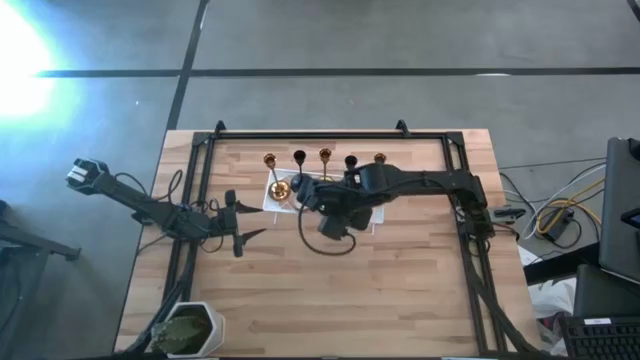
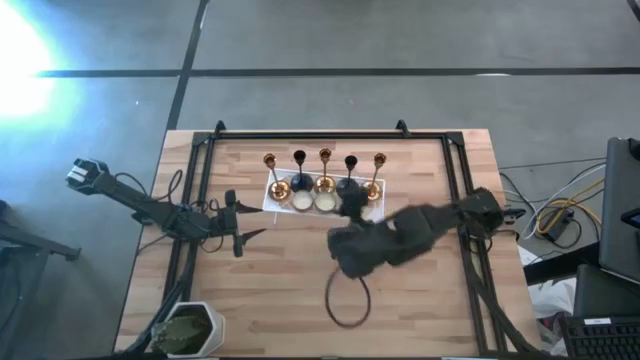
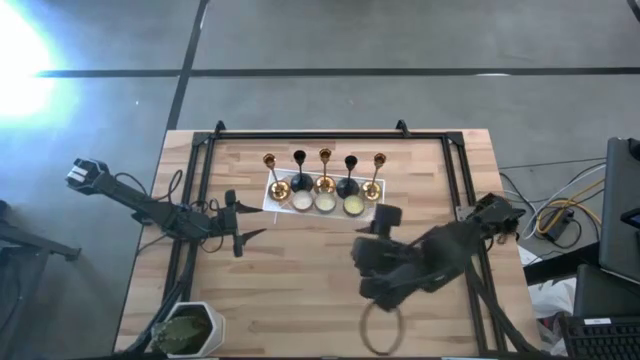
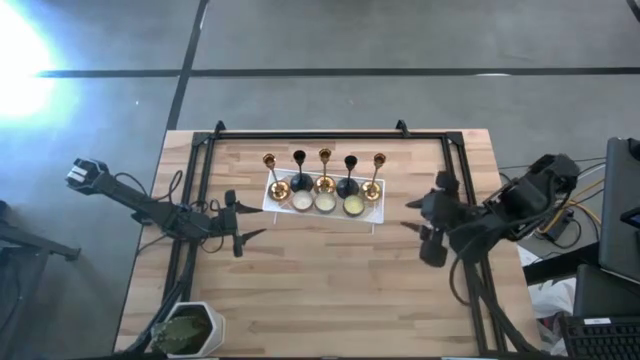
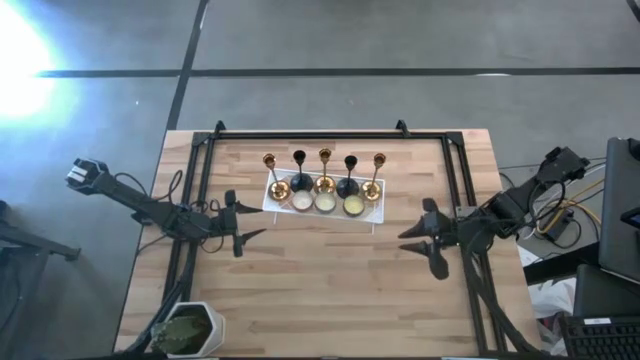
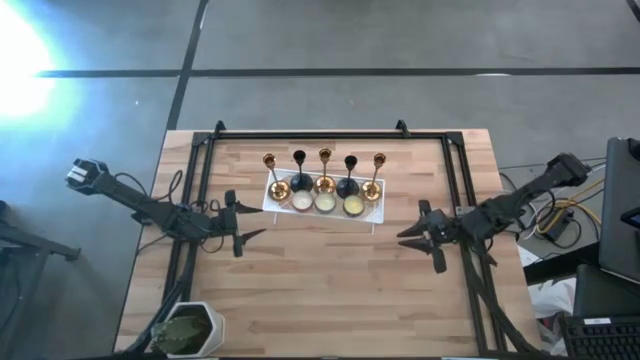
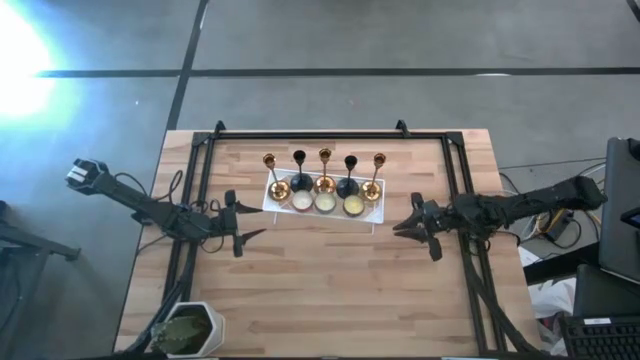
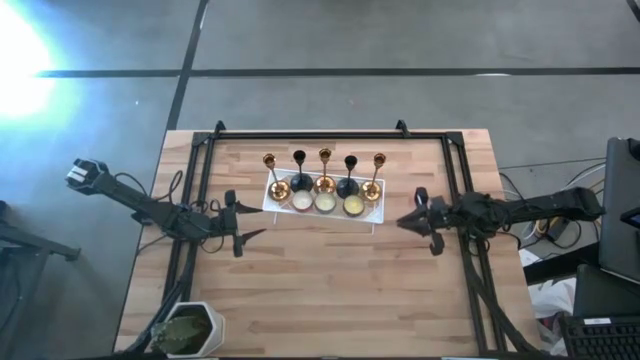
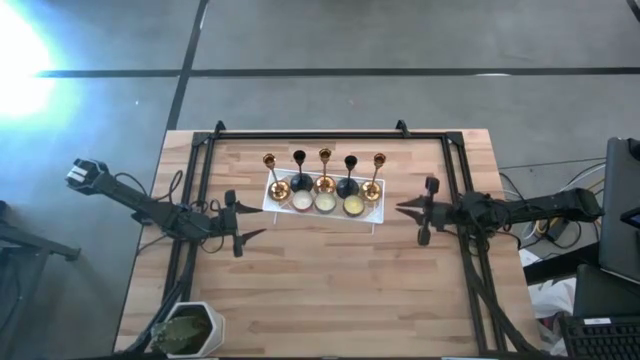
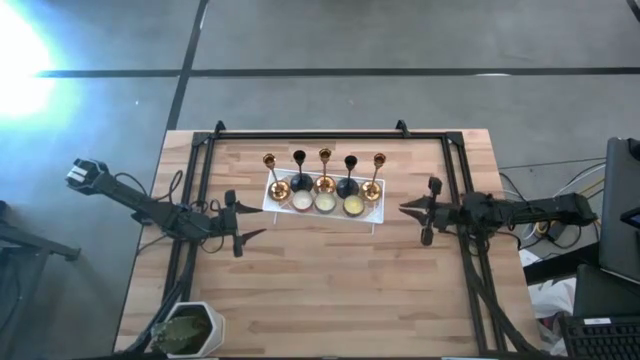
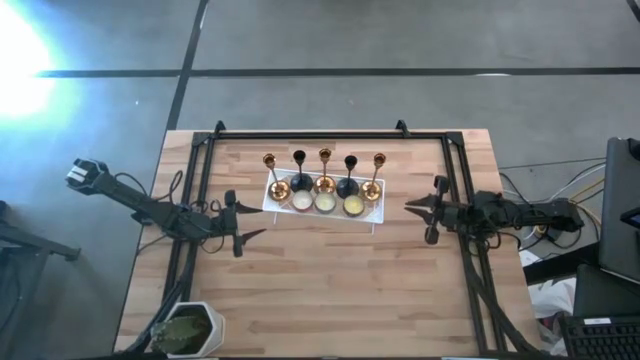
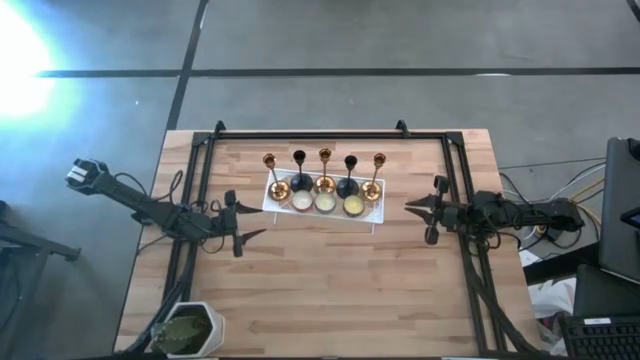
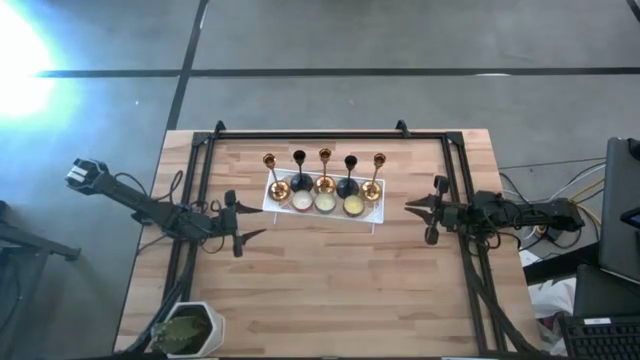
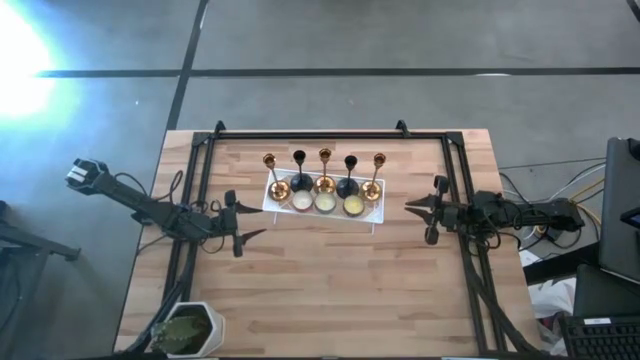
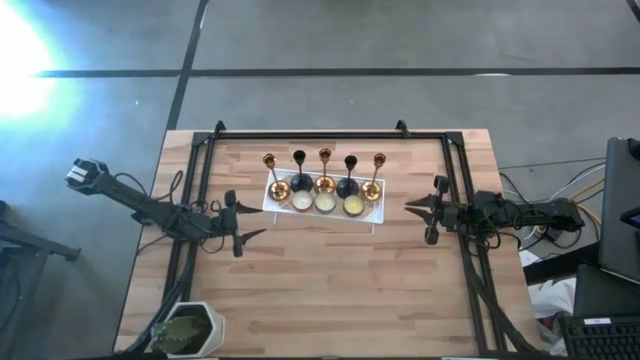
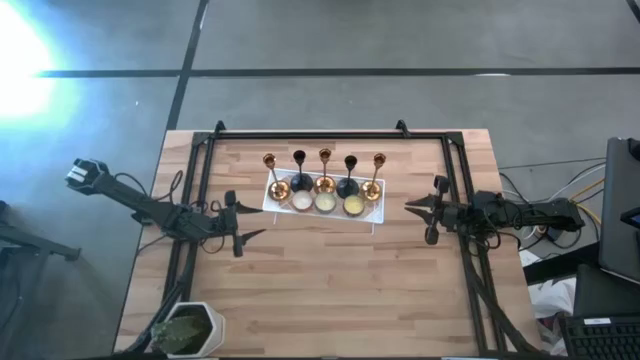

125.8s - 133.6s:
Task: Pick & Place candle stick holders
Return to Home Position

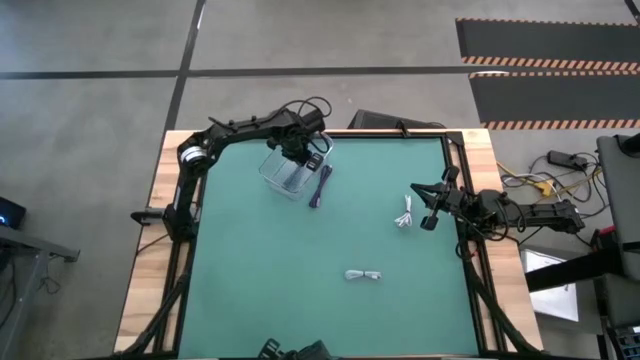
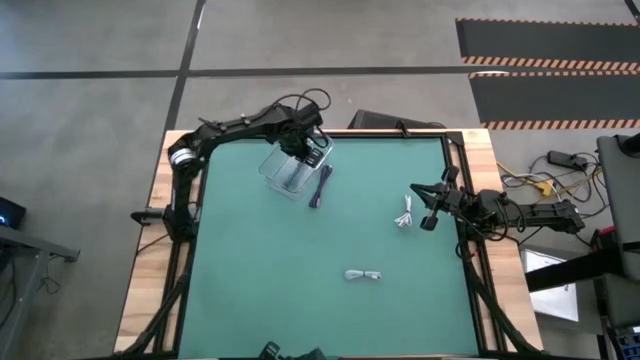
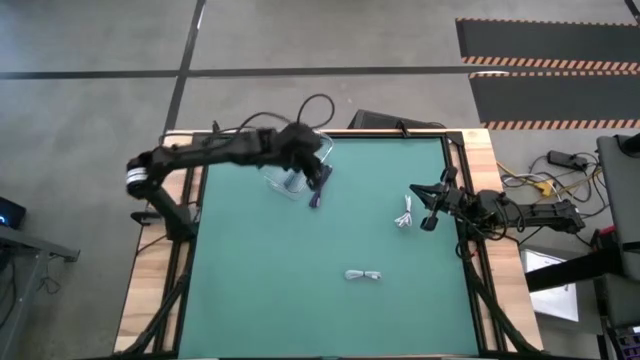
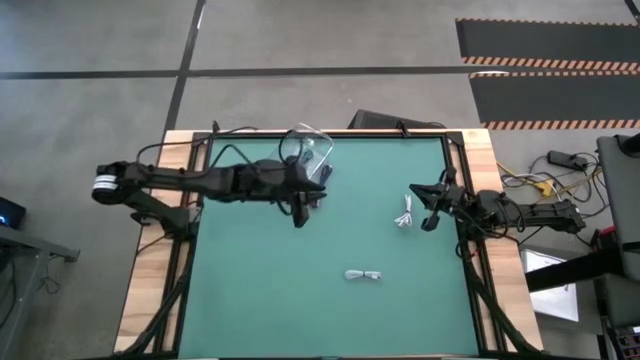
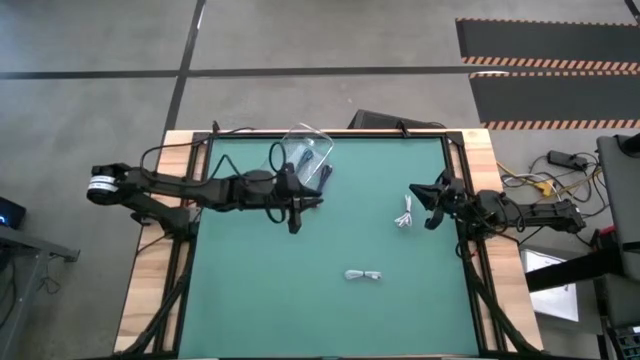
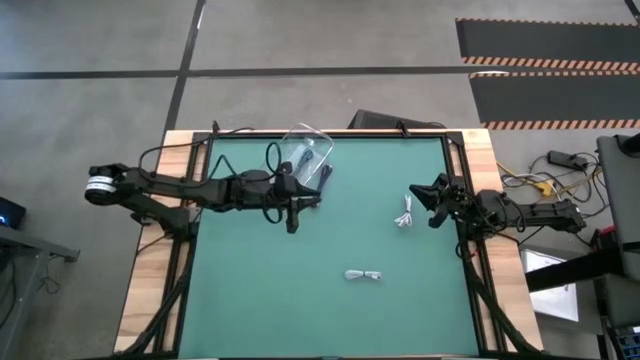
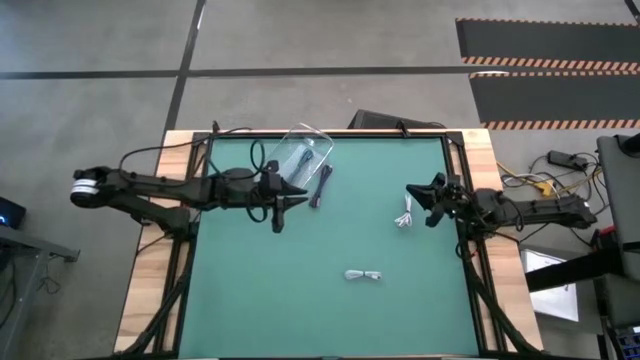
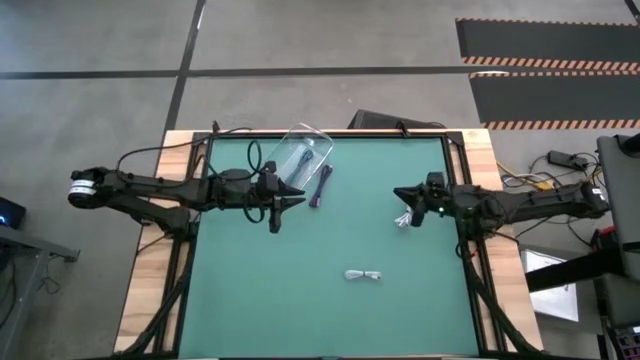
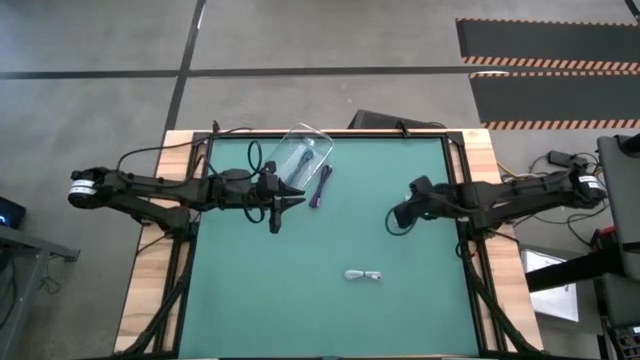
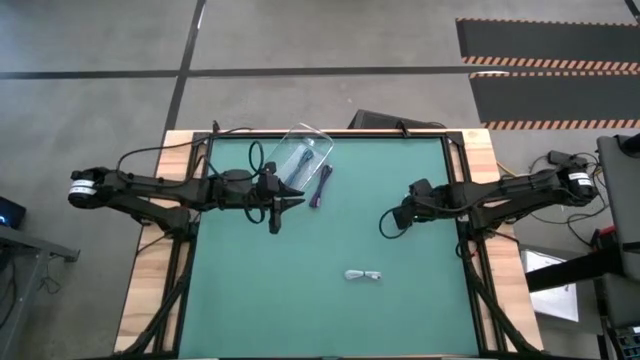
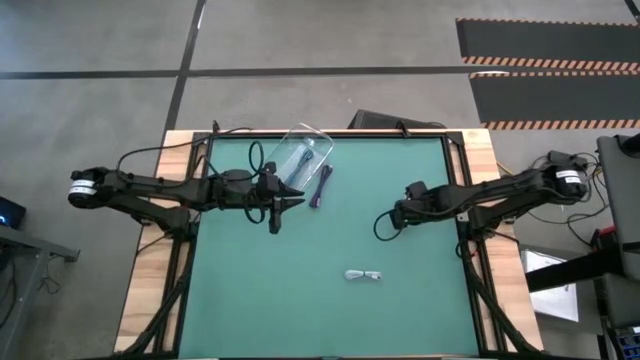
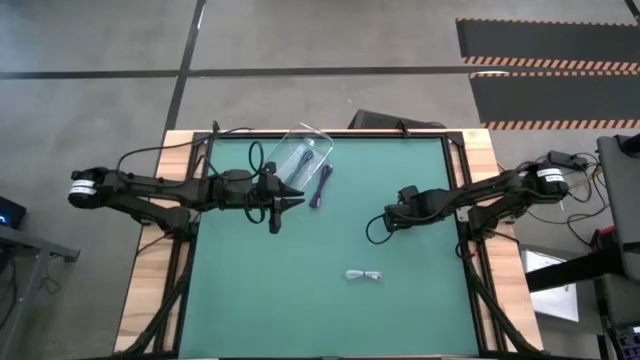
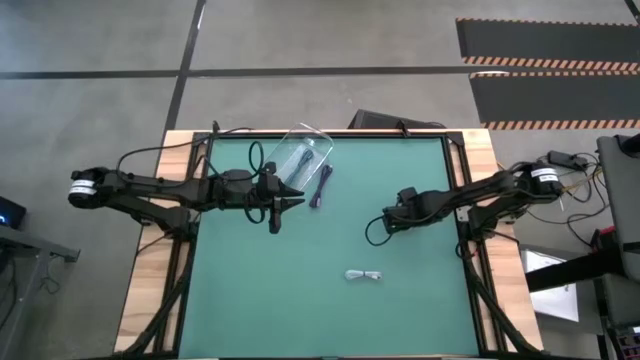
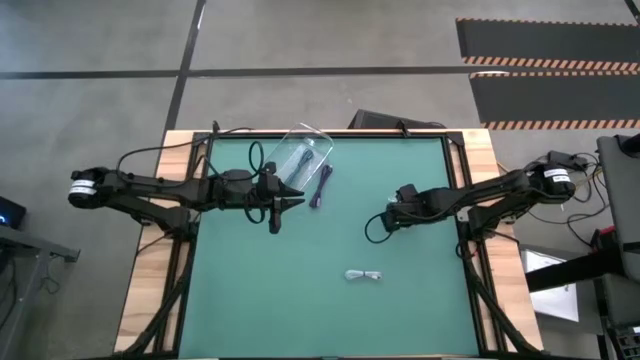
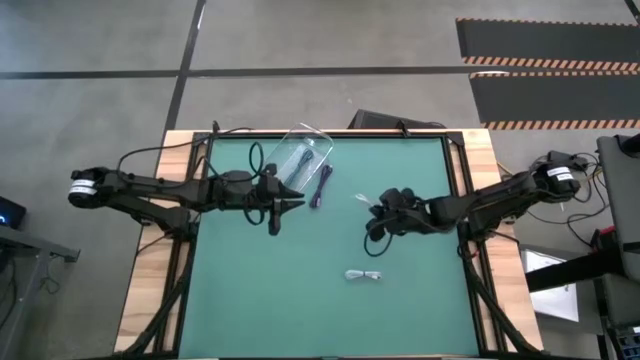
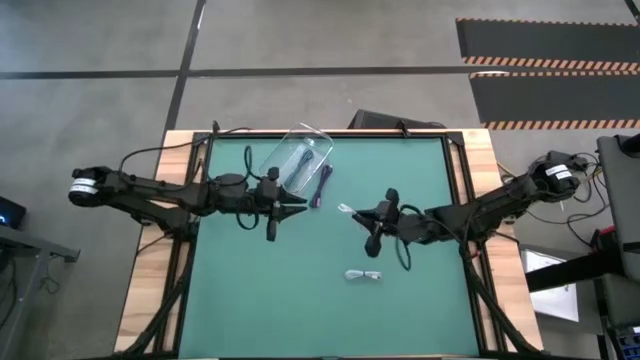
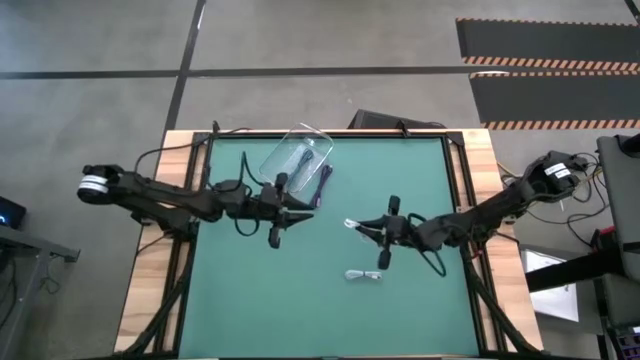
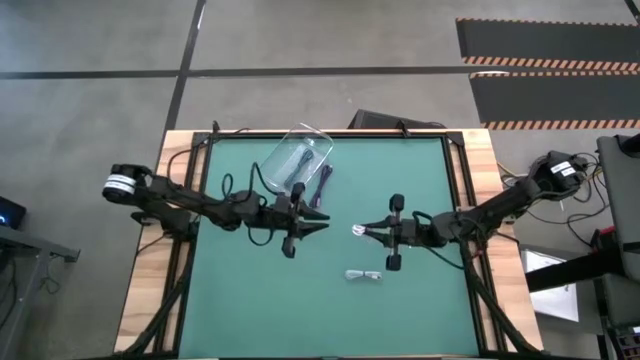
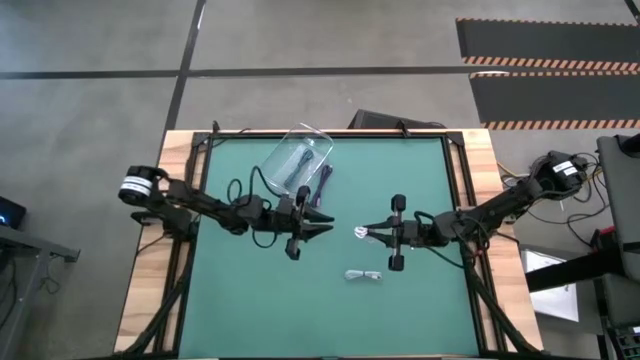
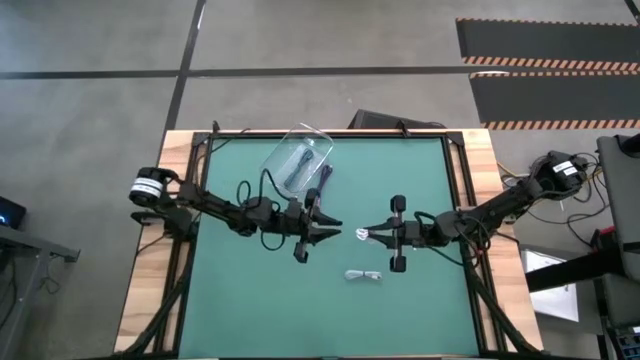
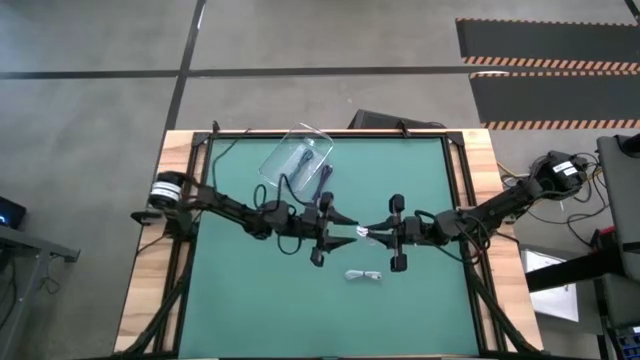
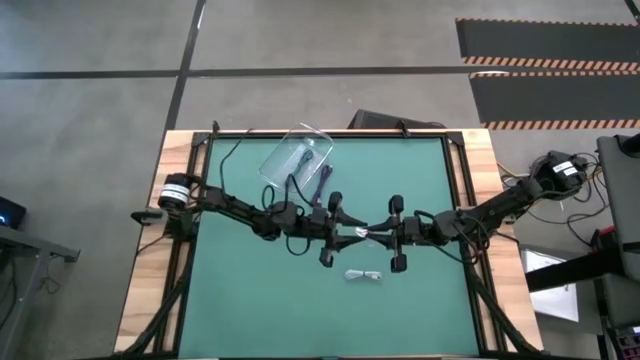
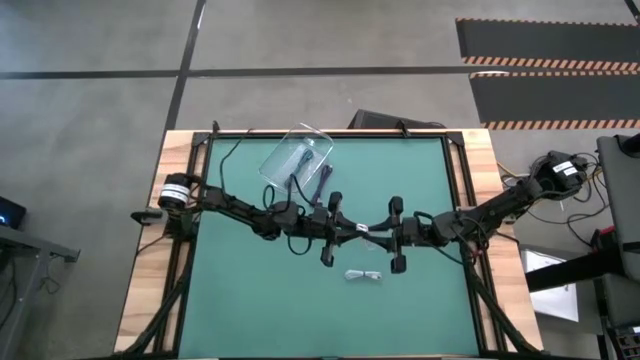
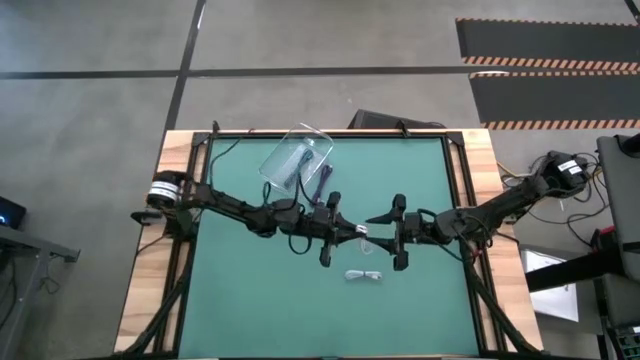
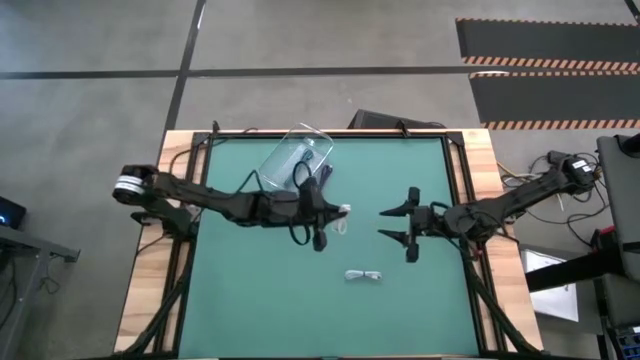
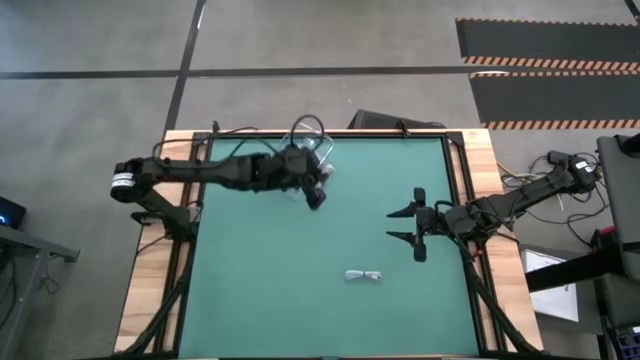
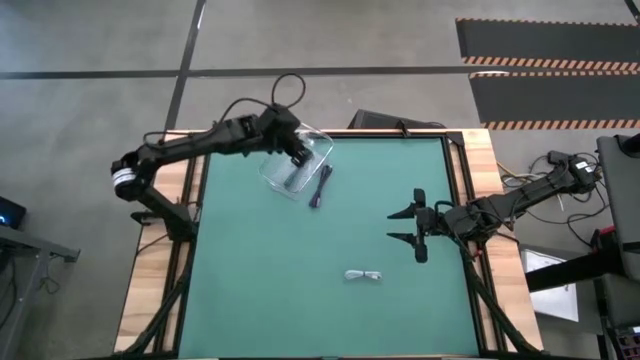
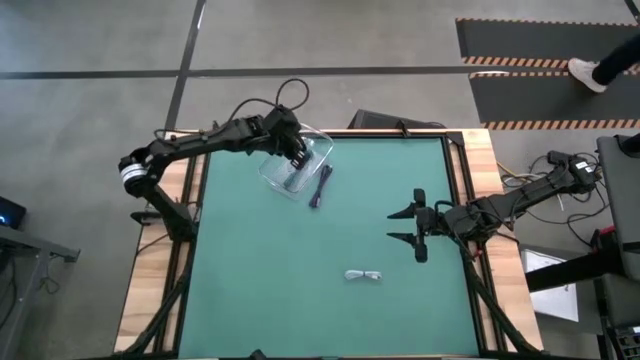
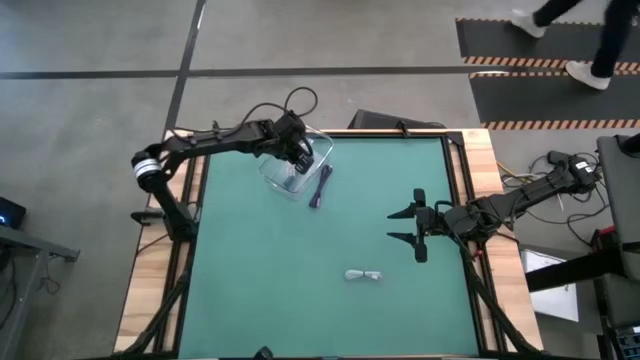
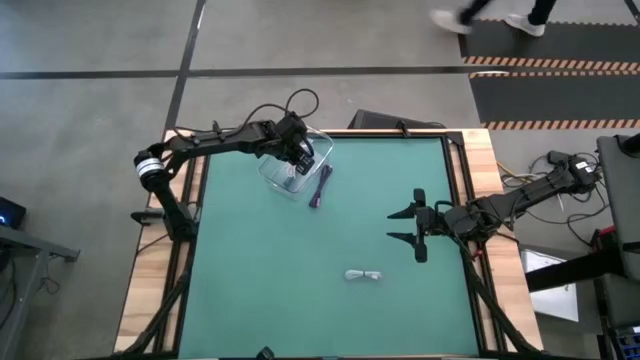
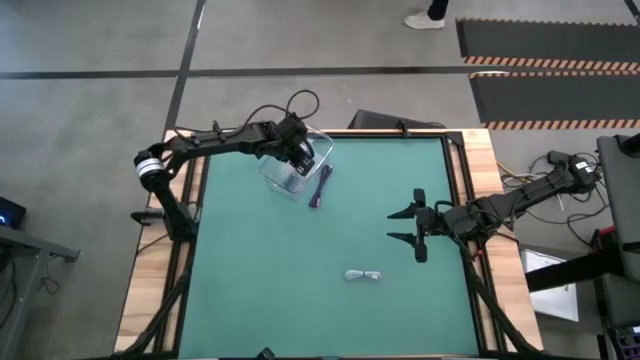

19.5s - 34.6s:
Task: Pick and place USB-C Cables
Put the white USB cable into the transparent bin
